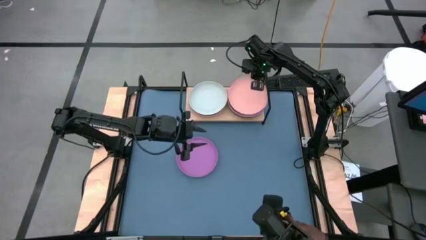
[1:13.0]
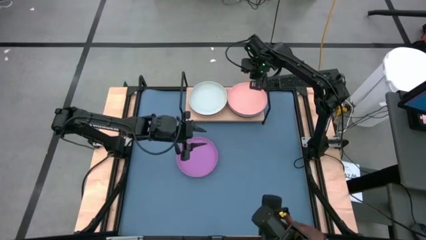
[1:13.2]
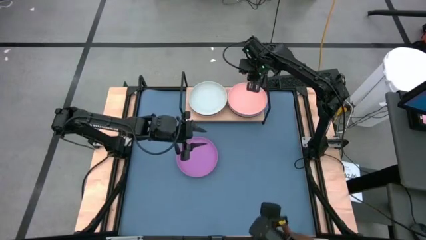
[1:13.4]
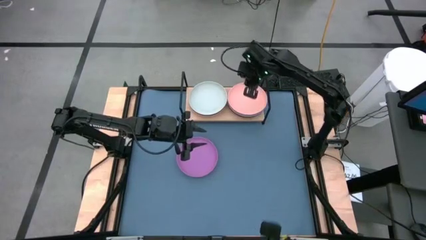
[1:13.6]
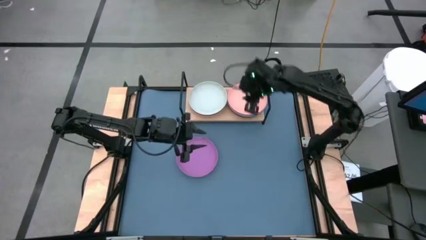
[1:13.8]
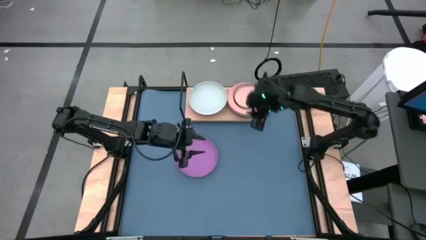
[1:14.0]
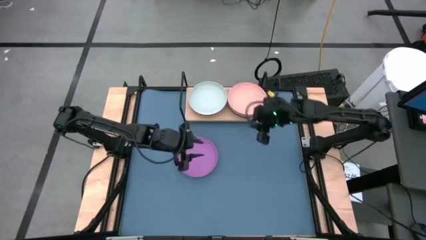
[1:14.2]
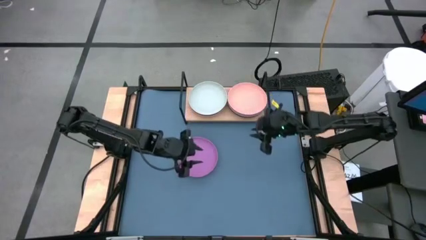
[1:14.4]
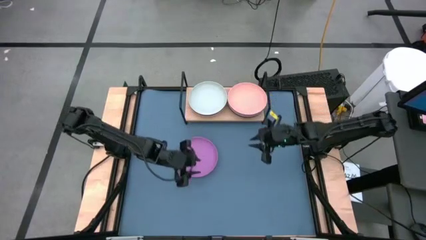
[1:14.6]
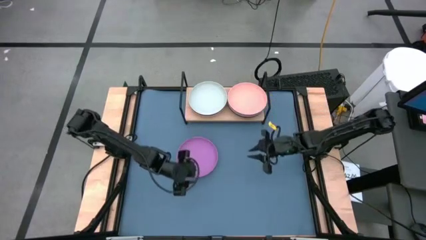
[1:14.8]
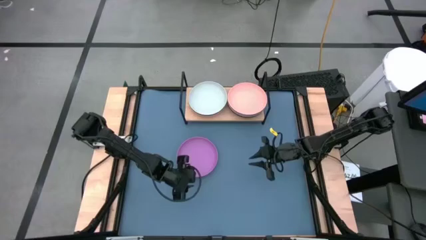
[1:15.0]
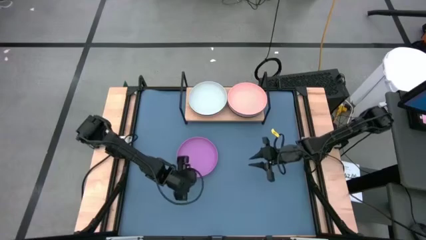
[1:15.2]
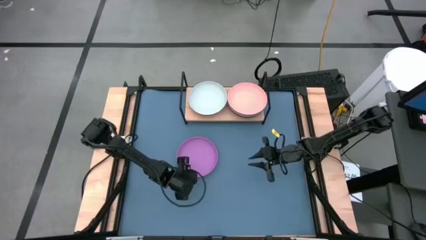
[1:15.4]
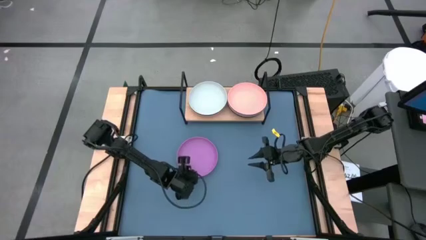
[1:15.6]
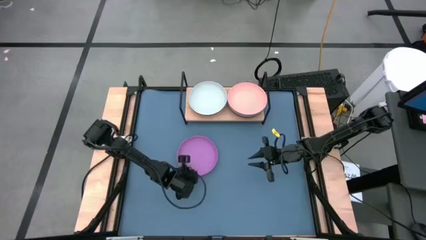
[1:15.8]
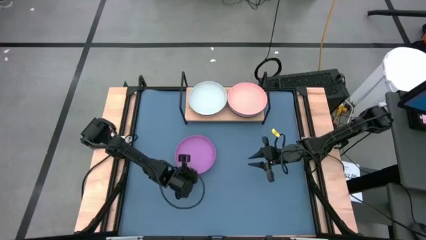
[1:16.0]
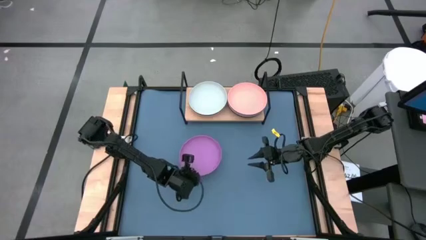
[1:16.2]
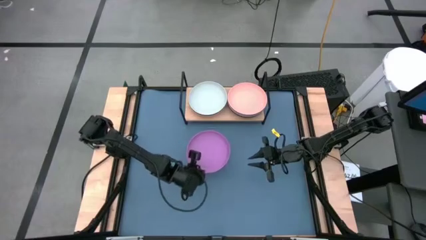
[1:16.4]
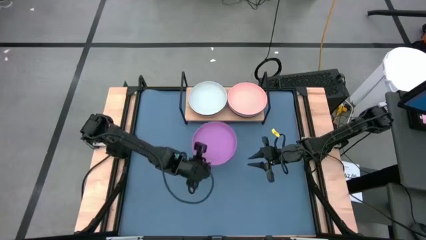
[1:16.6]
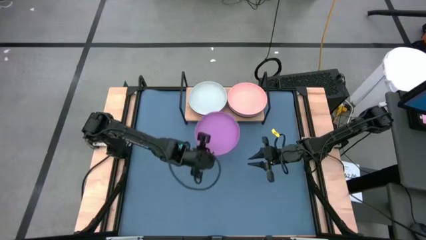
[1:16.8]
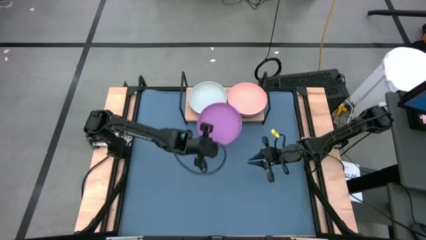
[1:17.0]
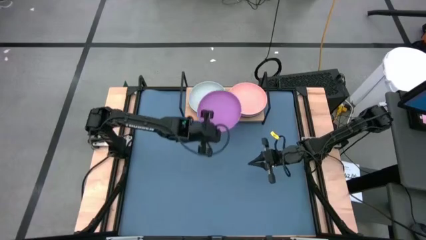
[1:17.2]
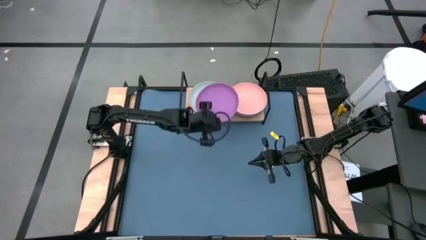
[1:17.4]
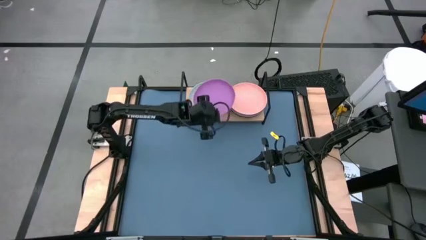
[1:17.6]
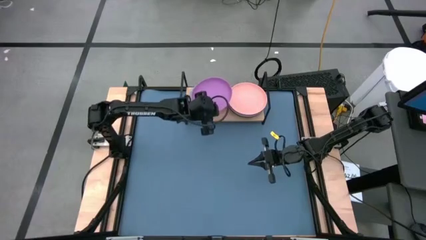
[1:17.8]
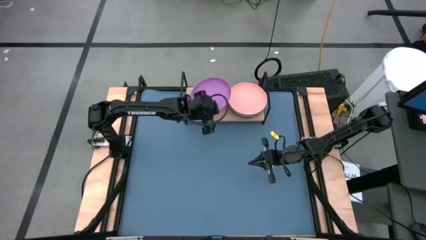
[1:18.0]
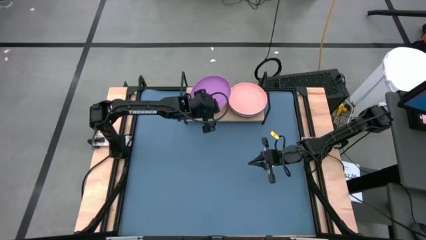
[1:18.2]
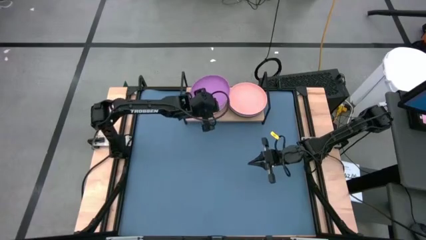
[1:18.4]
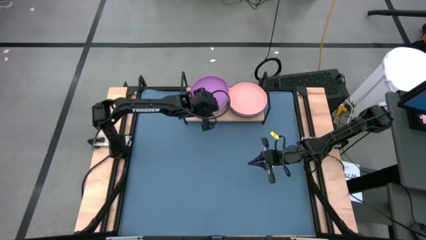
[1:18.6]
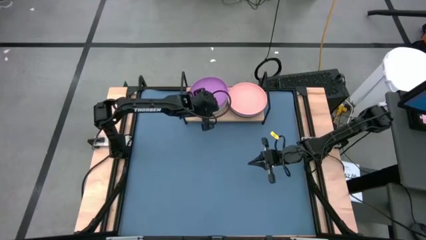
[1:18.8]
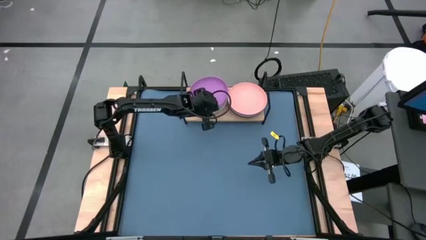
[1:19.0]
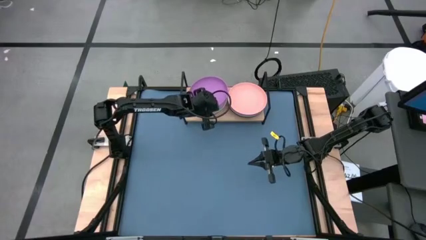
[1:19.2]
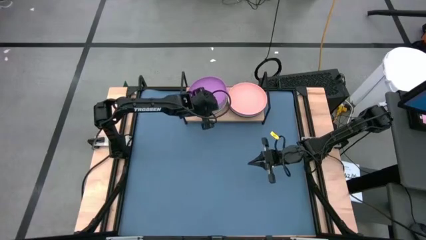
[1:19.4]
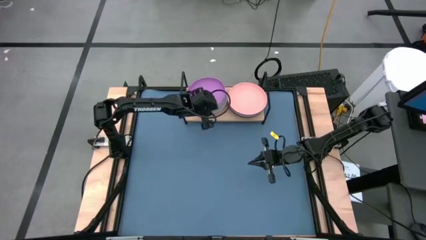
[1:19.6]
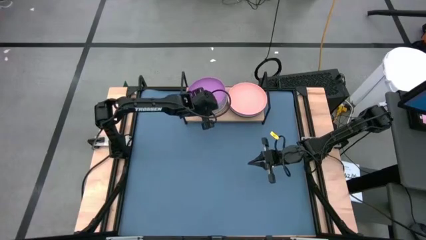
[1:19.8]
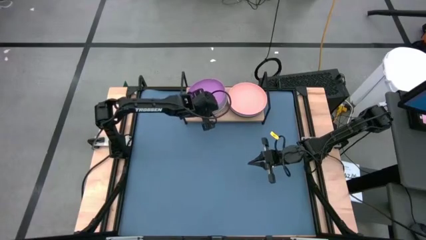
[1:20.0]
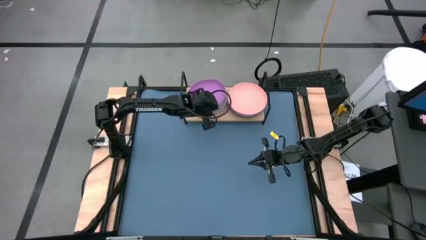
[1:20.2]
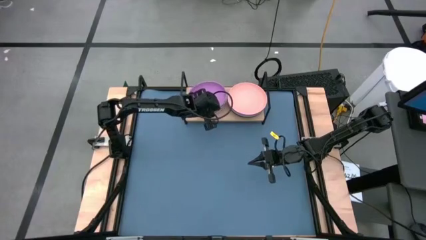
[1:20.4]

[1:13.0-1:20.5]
Task: Place and stack plates onto a shelf
Stack the purple bowl on the green bowl

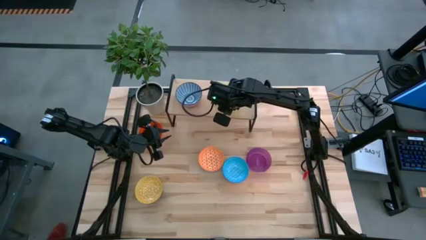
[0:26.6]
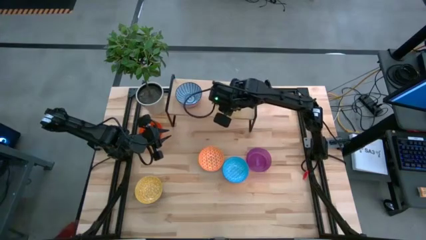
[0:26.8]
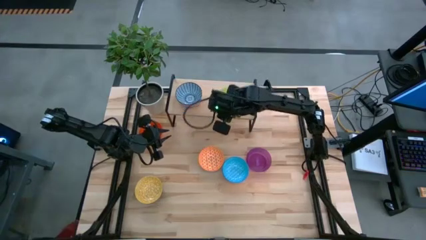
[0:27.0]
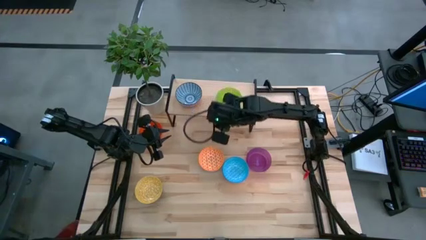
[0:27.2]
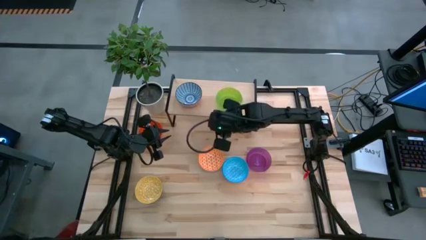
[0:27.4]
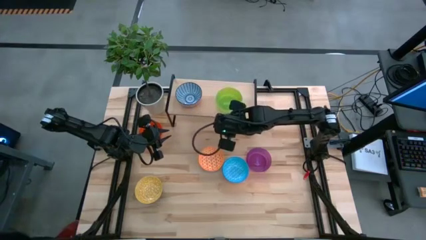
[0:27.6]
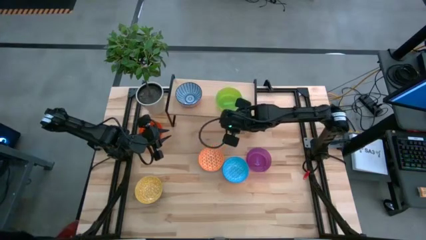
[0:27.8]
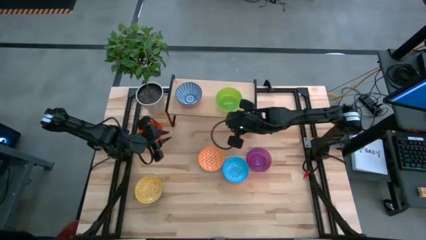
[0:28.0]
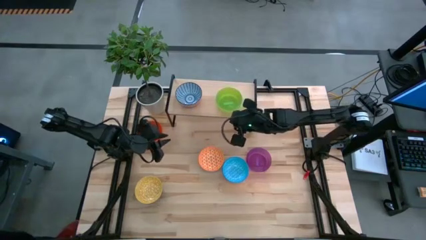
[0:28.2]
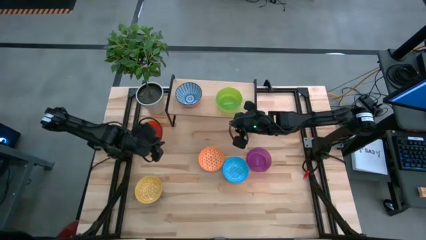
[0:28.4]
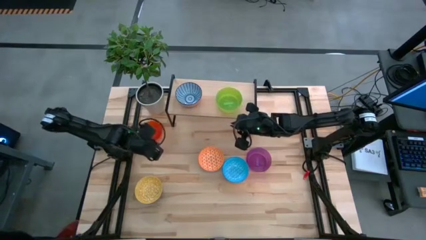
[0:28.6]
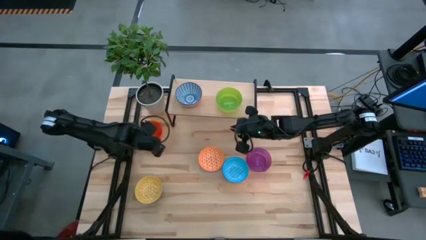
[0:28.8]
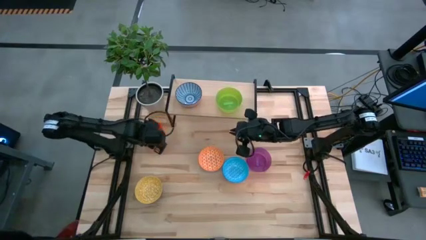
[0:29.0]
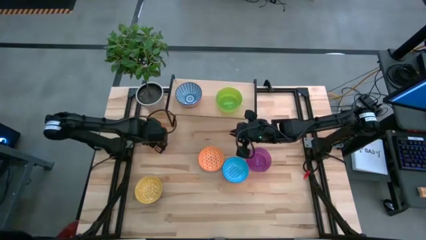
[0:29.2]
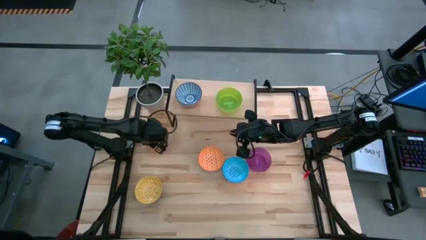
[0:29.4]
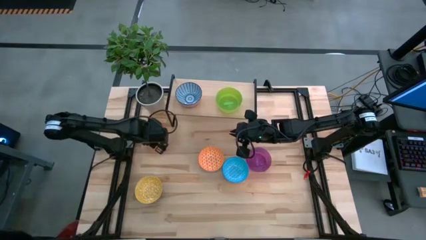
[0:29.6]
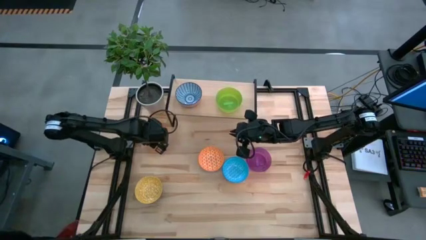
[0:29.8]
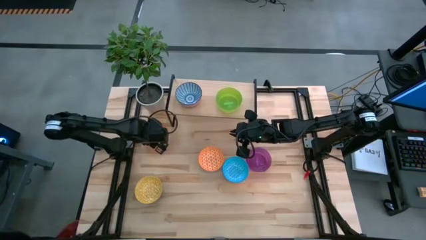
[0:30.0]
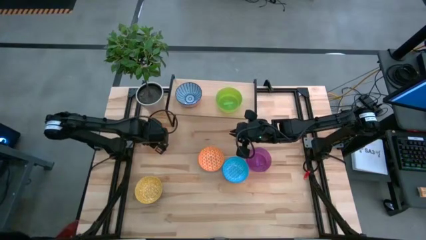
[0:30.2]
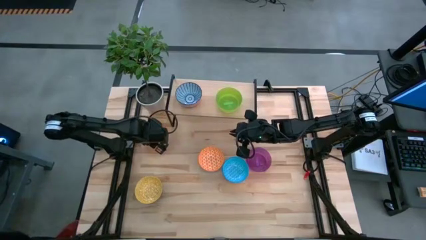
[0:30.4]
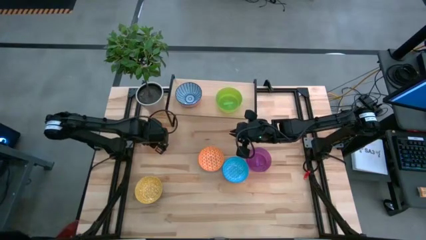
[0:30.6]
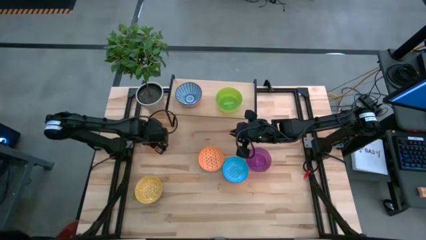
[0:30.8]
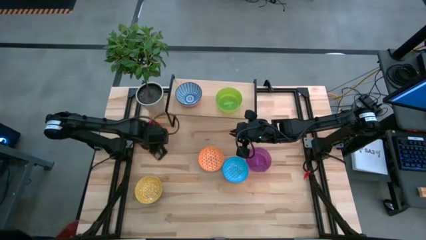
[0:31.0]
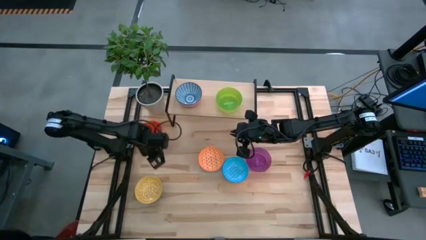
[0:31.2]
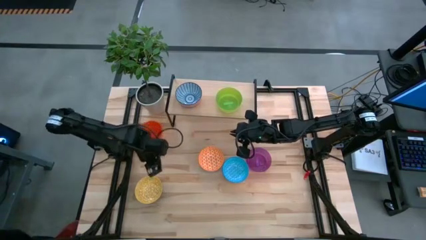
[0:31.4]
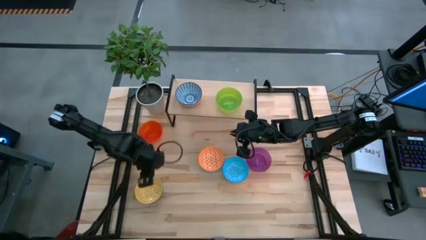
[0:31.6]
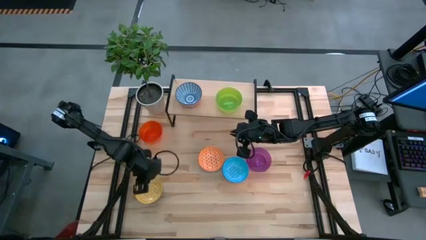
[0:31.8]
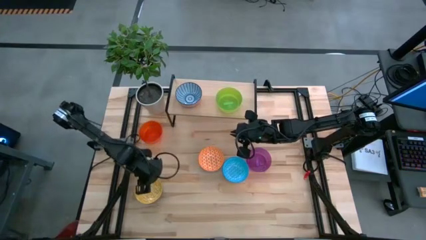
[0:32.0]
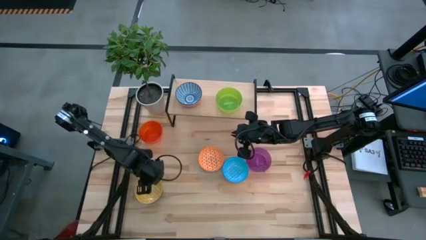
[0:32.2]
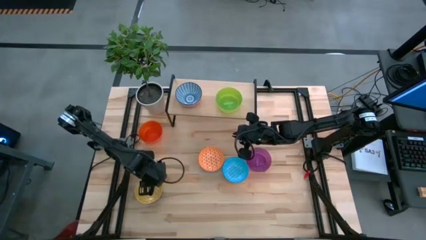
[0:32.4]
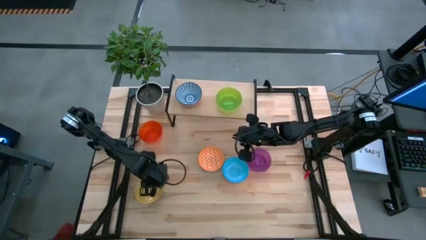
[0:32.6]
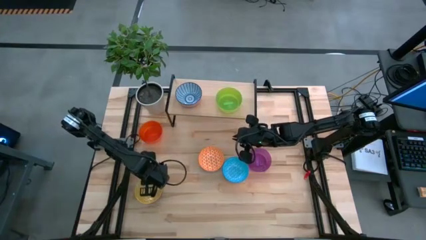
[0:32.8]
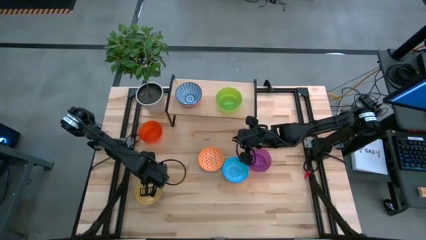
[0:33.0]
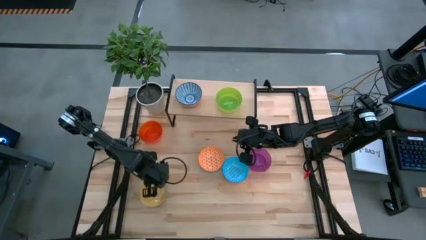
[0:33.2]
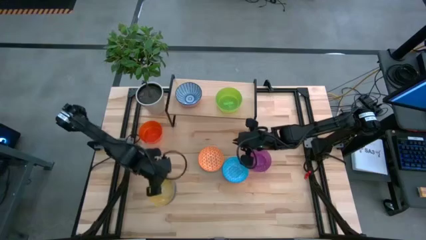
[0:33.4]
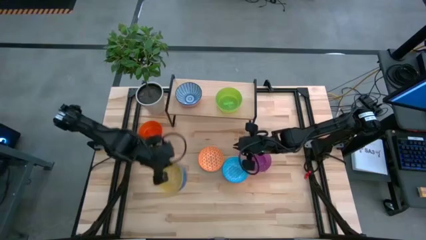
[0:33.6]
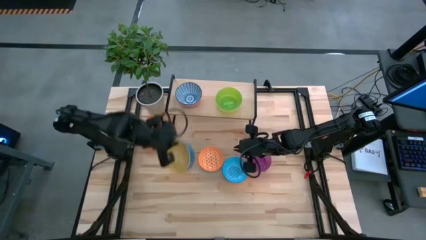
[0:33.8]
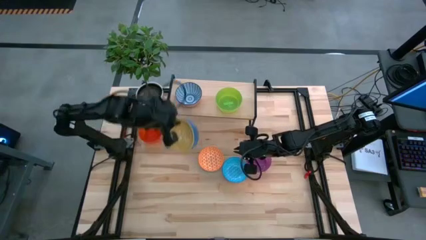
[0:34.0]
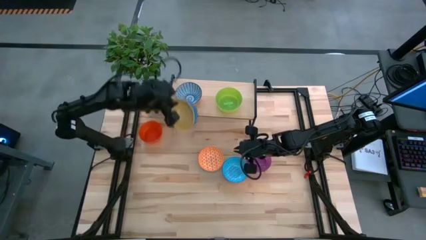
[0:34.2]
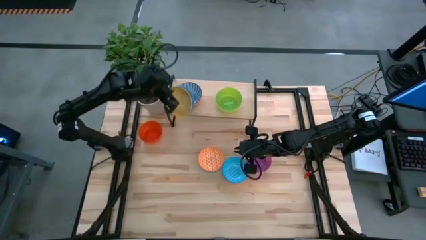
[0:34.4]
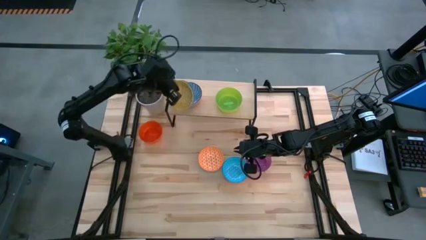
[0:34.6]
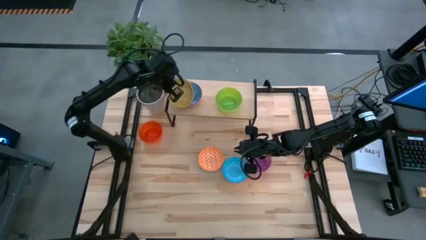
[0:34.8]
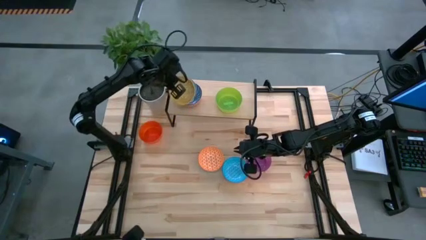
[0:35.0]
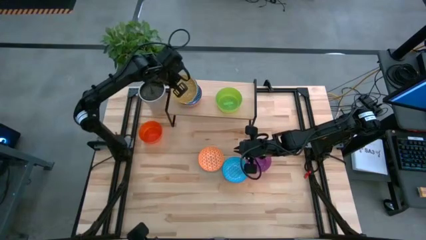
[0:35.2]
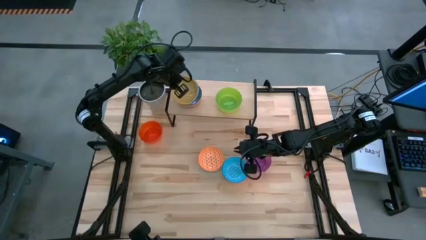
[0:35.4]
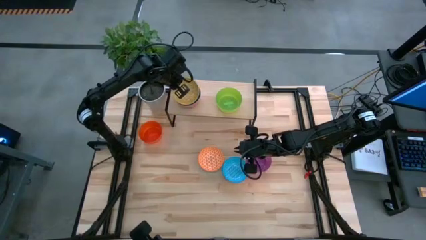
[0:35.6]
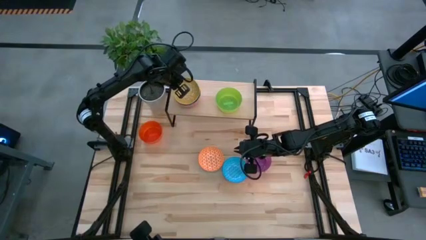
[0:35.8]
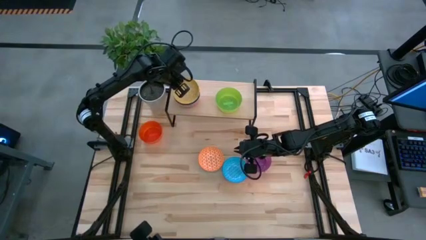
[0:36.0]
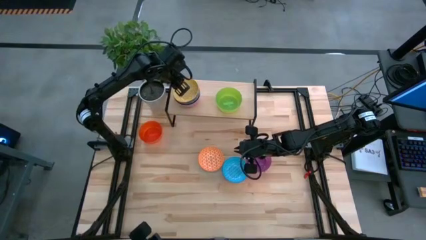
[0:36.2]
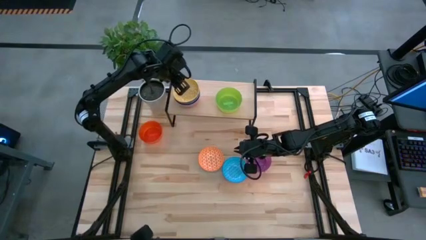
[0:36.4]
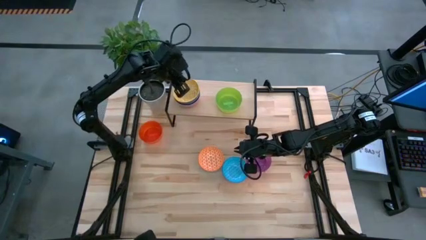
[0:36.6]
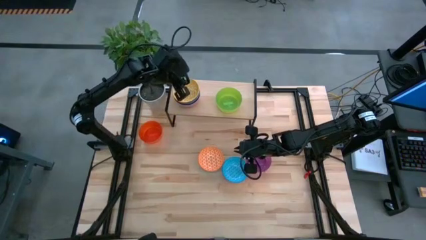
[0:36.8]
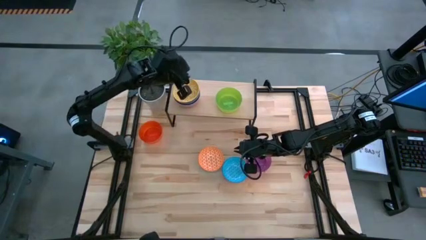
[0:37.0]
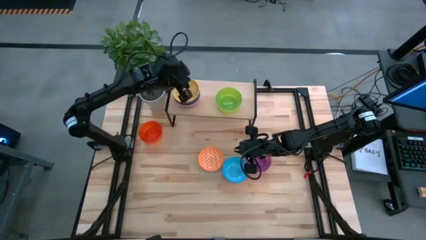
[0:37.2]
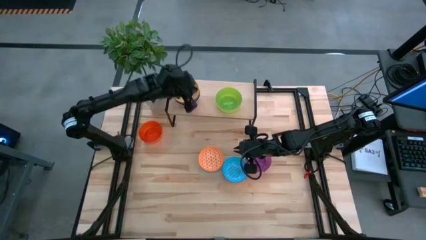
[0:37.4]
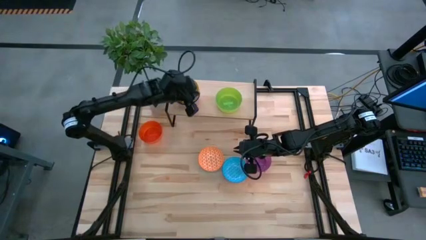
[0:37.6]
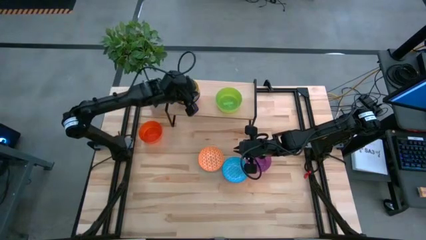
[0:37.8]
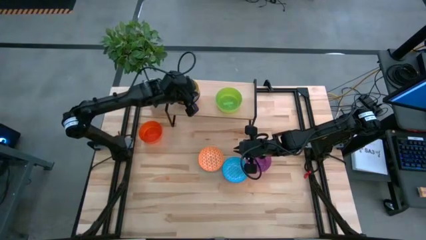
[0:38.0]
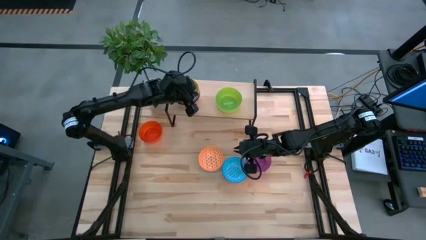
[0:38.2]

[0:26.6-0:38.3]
Task: Place and stack bowls onto a shelf
Stack the yellow blue bowl into the red blue bowl on the shelf
